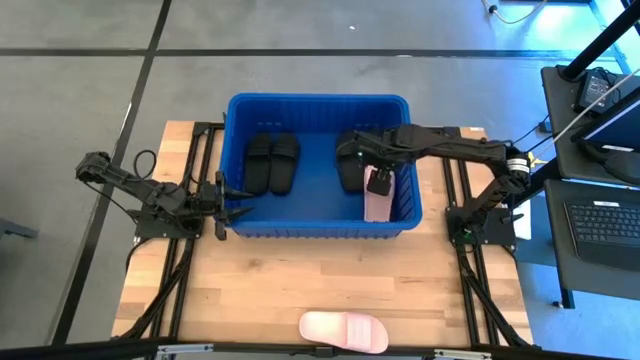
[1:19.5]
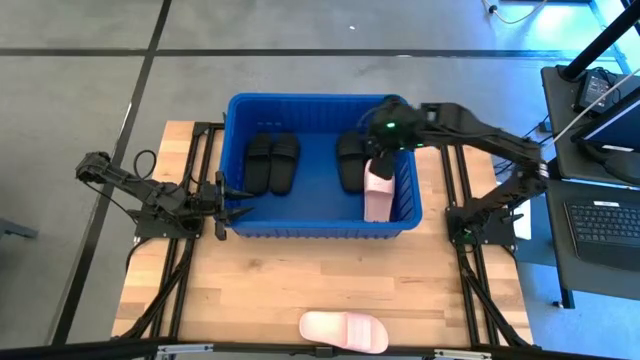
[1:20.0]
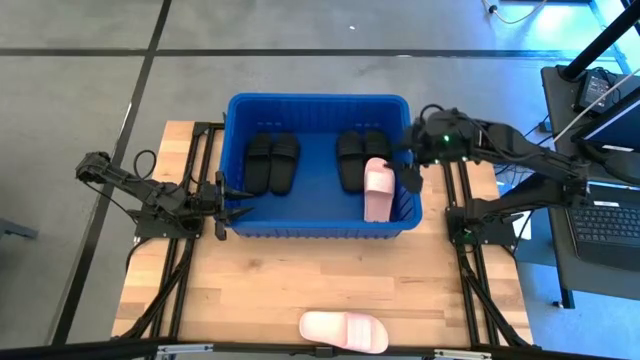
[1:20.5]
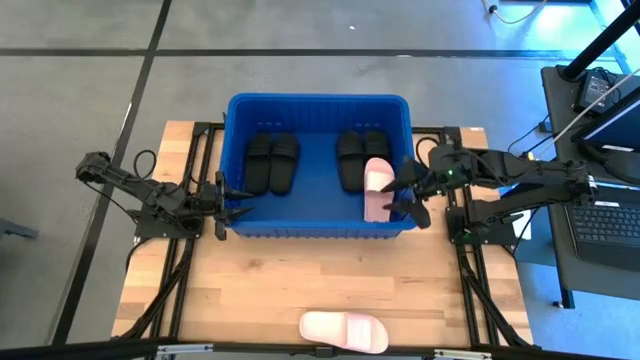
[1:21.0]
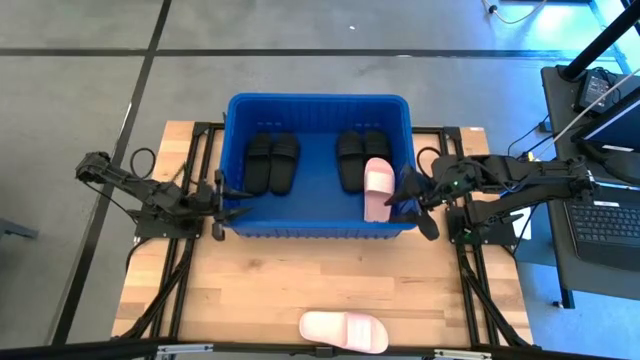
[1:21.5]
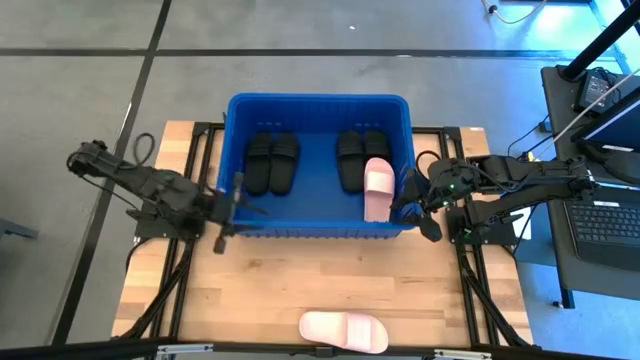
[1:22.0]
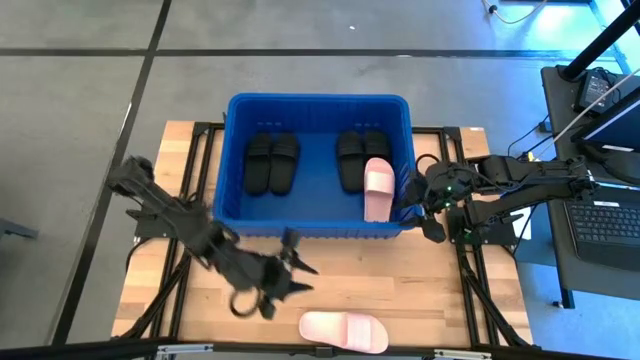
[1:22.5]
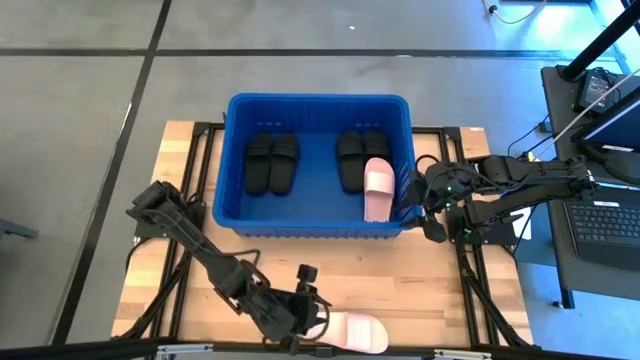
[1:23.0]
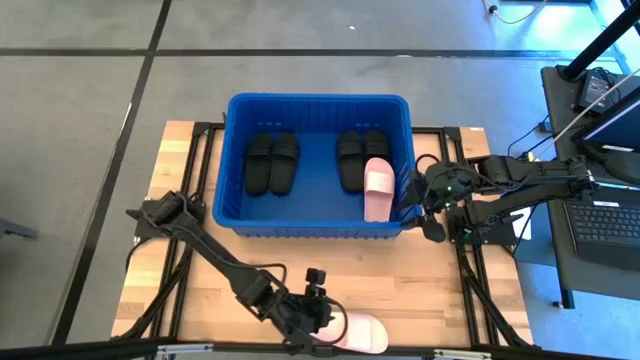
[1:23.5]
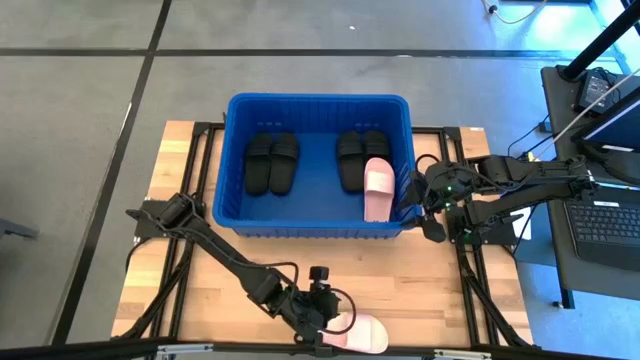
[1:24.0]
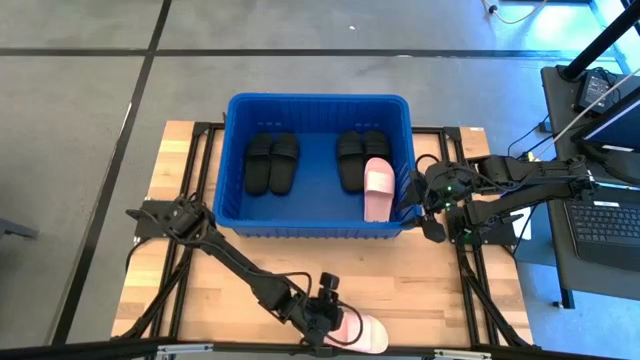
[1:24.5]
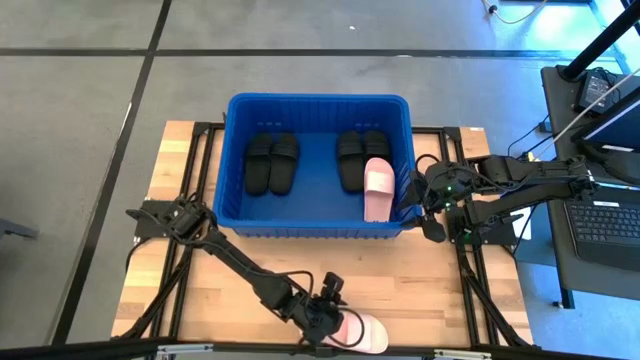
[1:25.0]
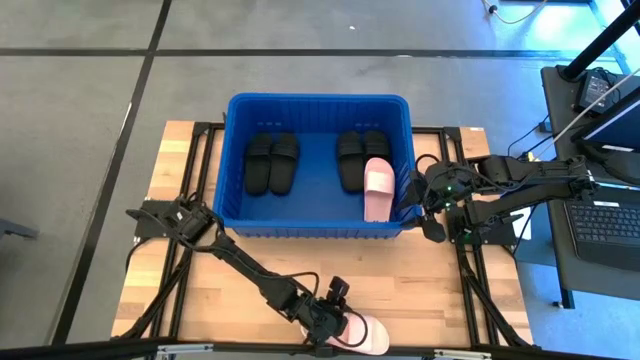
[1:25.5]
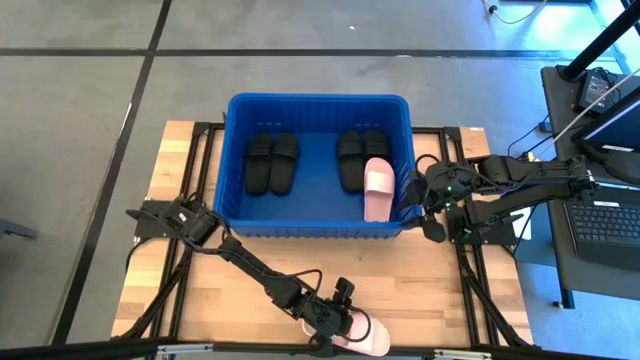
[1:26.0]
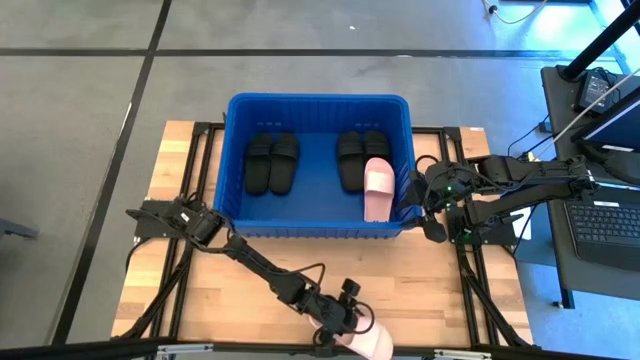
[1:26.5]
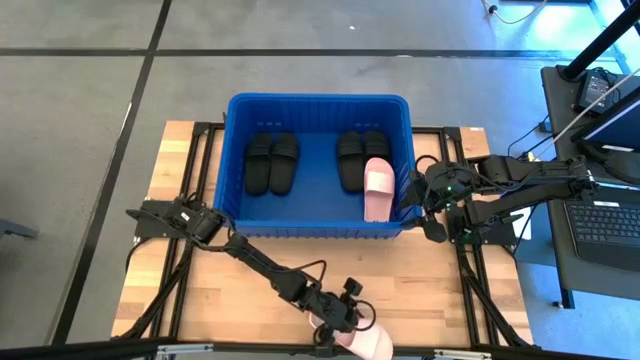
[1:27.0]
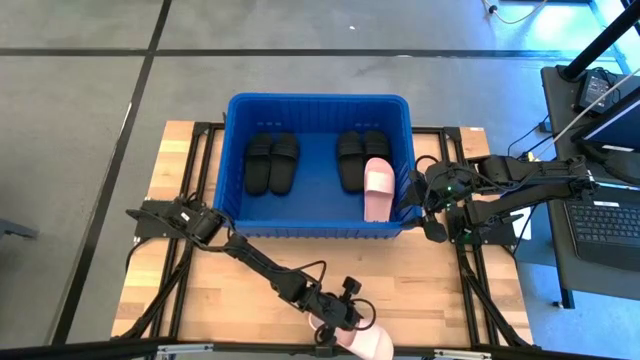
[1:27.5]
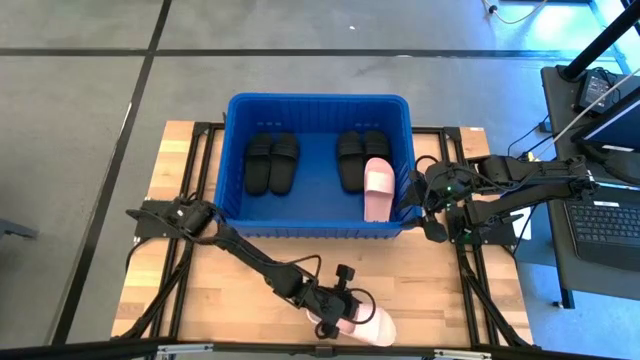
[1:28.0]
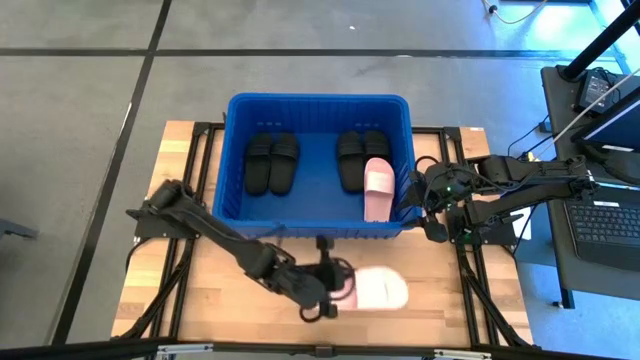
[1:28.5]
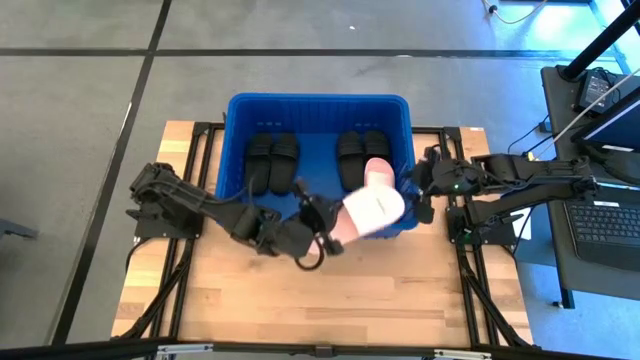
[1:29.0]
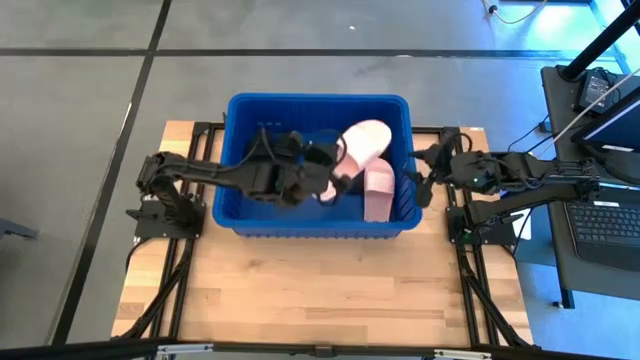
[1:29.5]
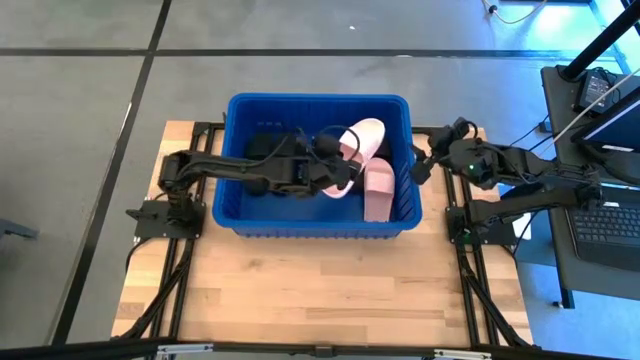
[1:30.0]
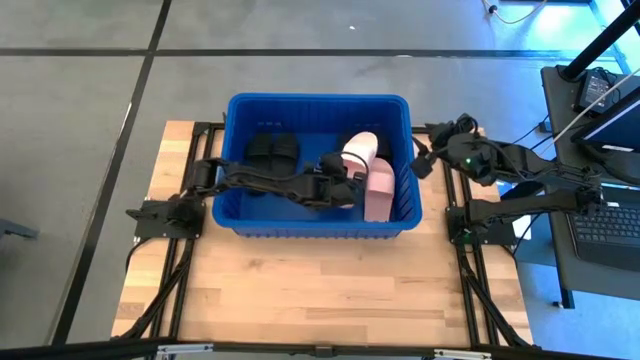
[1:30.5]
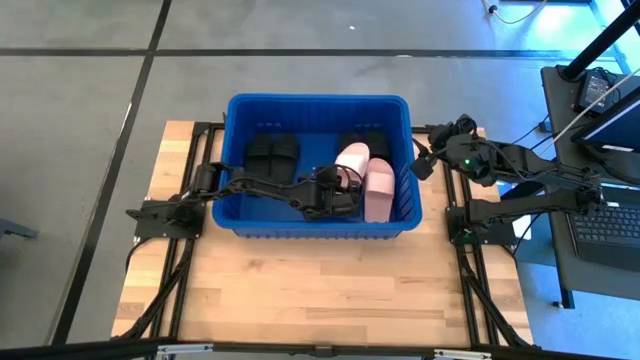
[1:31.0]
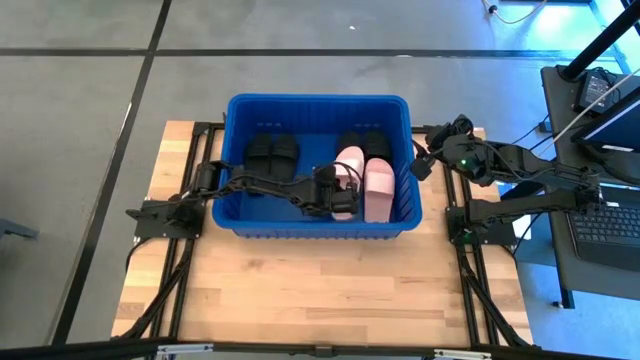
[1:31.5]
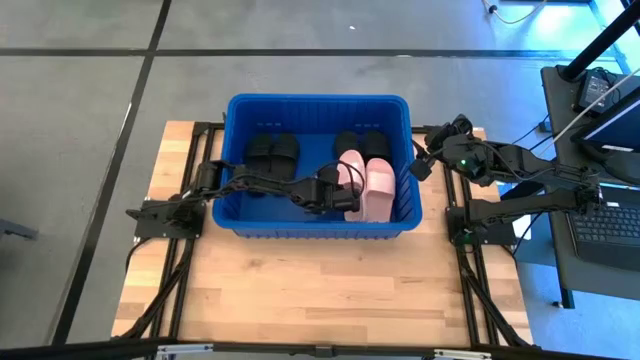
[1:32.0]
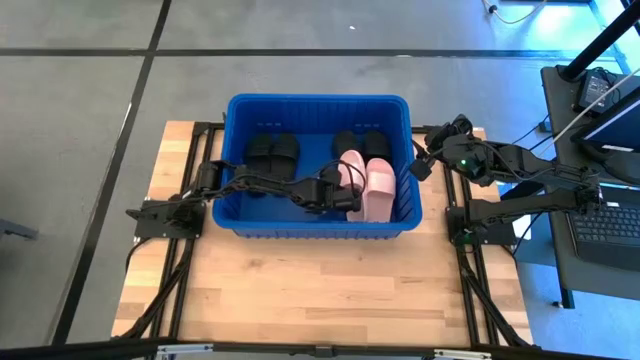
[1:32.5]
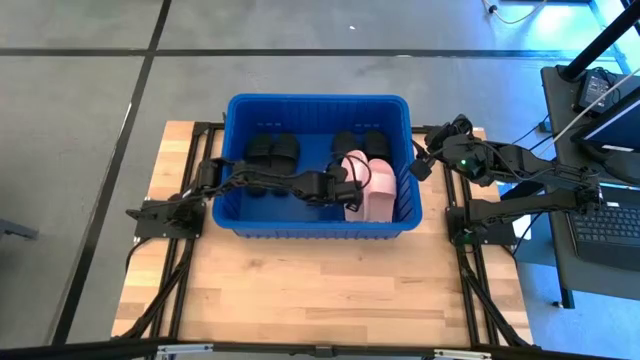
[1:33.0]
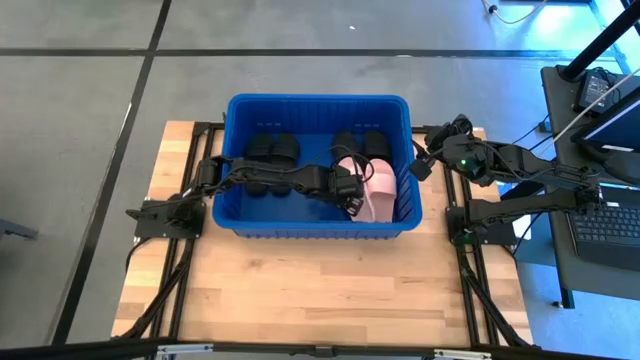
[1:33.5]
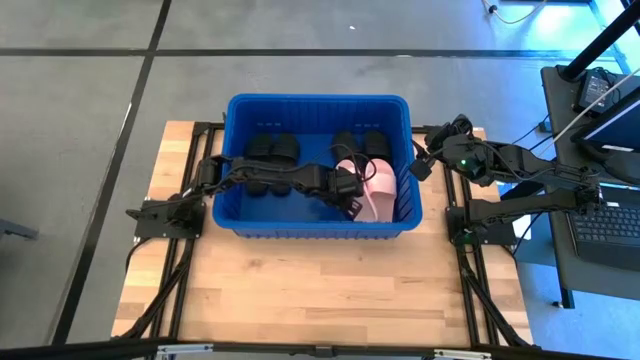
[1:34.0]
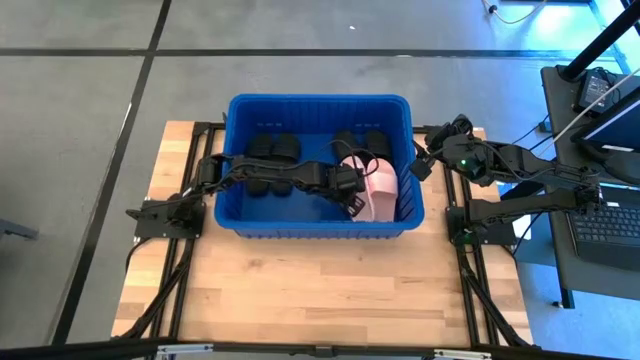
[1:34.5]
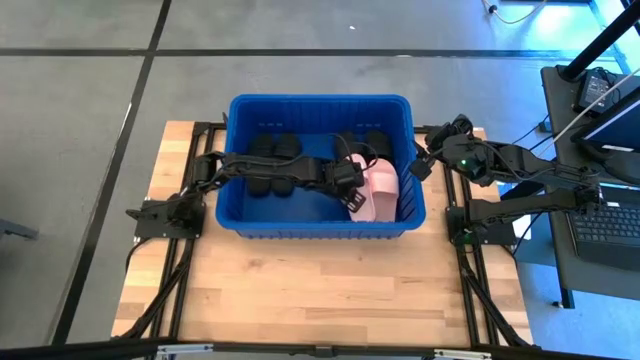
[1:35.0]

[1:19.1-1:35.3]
Task: Pick and place slides into bin
Put the pink slide into the blue container

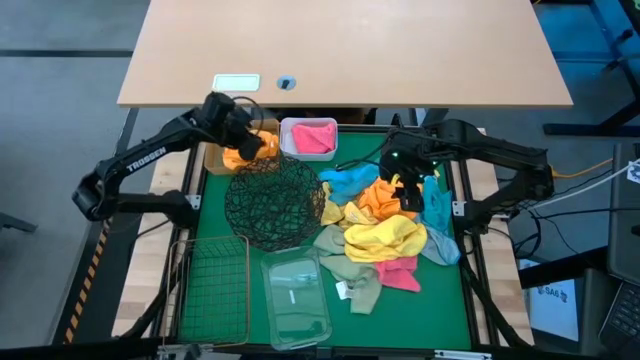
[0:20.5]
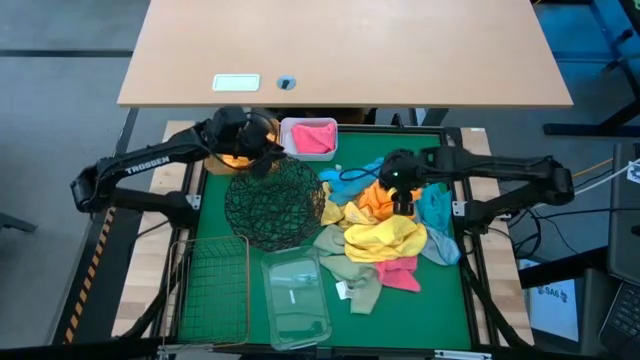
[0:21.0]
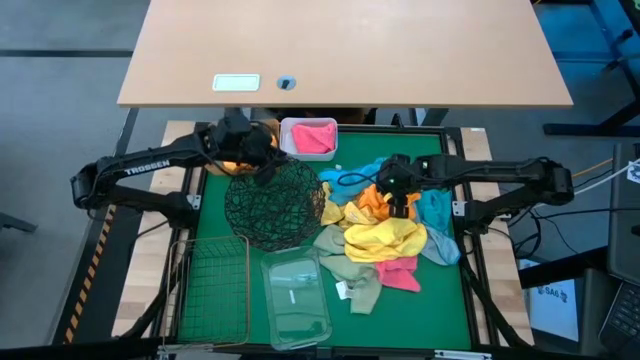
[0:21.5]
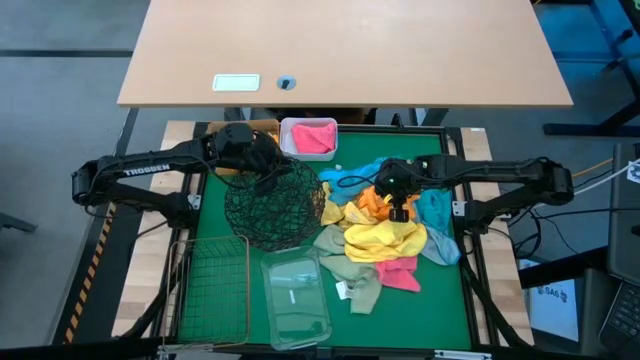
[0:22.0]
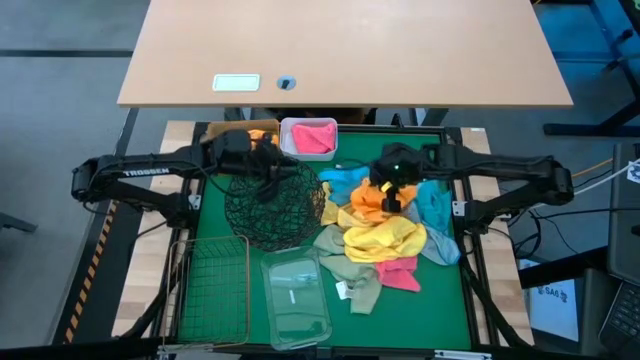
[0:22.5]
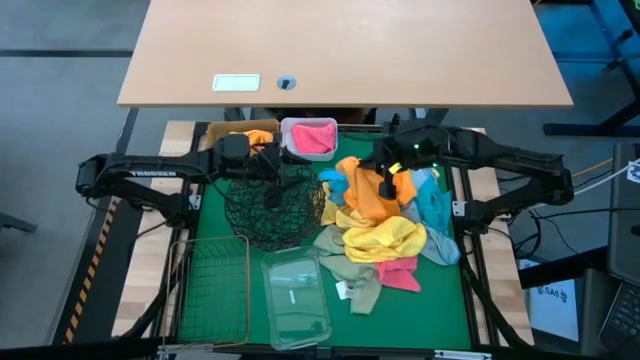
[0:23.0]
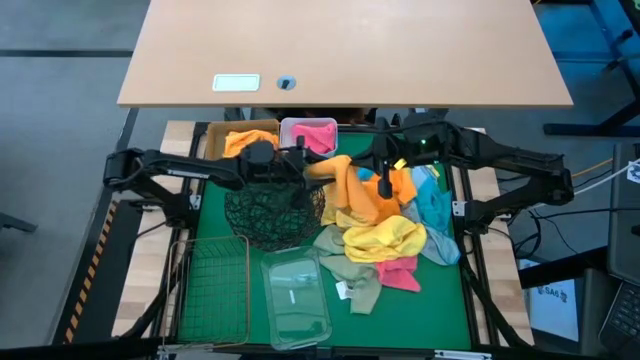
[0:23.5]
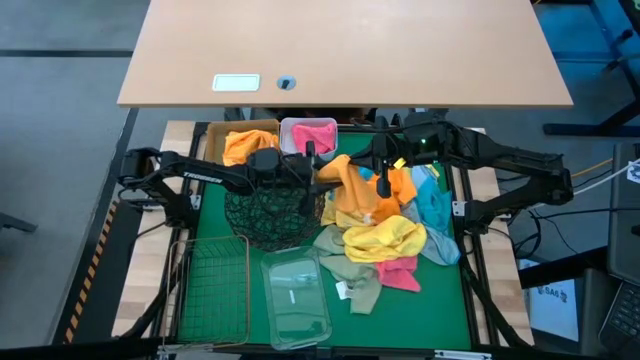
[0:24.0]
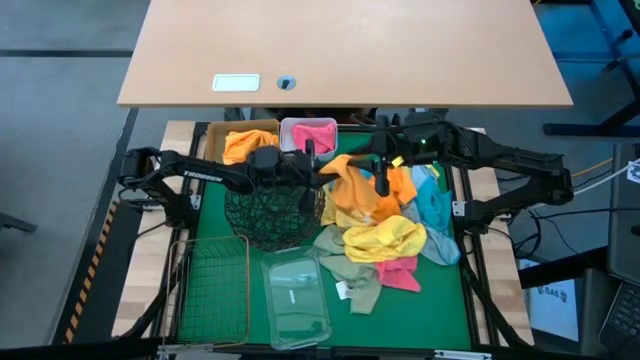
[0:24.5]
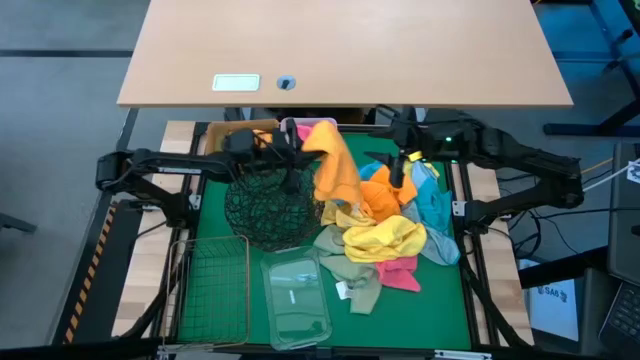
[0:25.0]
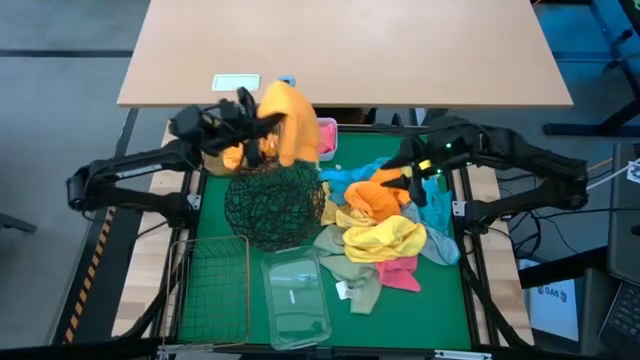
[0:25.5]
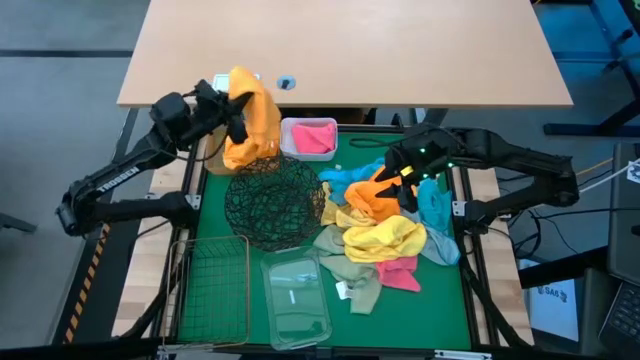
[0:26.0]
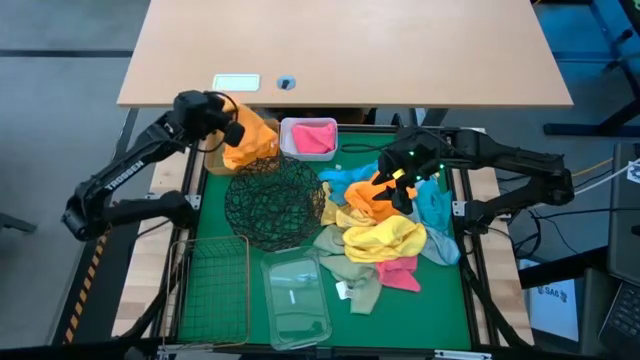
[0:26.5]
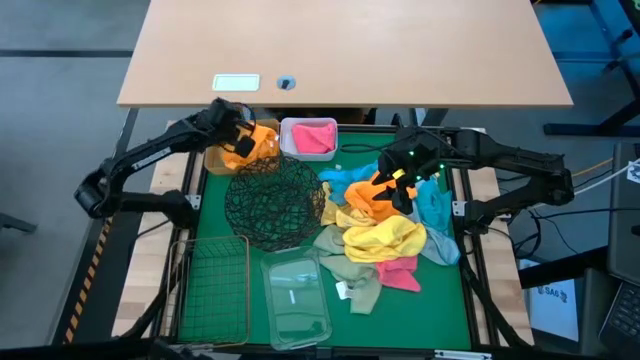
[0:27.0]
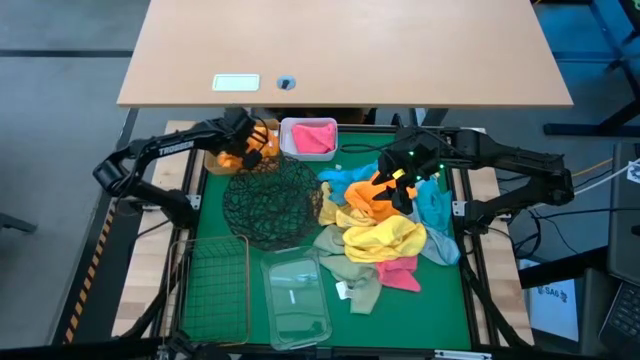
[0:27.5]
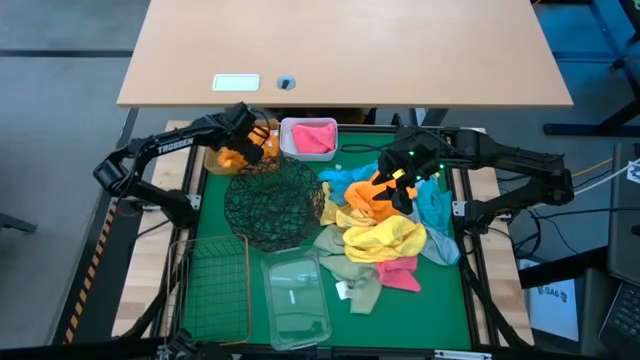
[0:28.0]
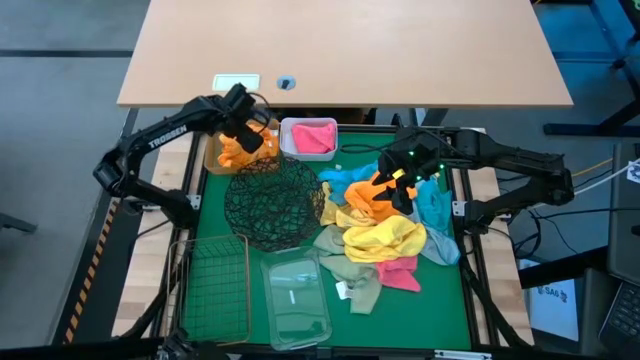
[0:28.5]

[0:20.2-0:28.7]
Task: Sort microfiber towel by color & place in baskets
Put the orange microfiber towel into the orange bin
